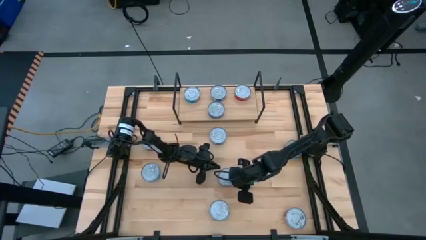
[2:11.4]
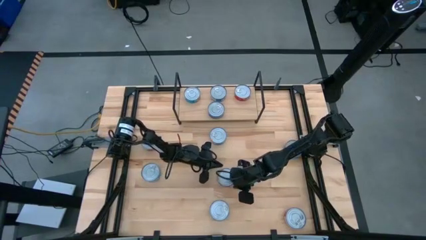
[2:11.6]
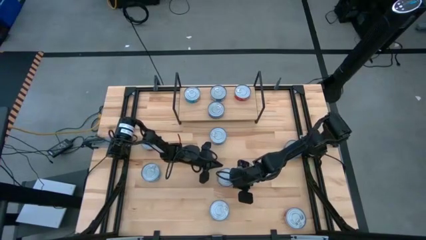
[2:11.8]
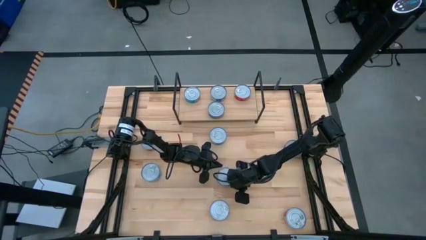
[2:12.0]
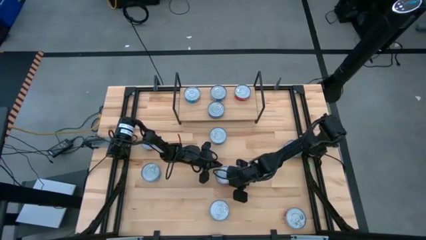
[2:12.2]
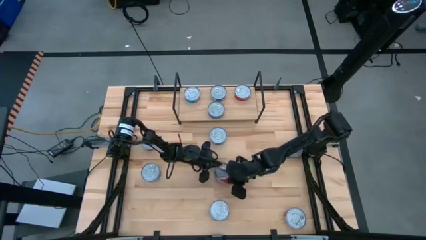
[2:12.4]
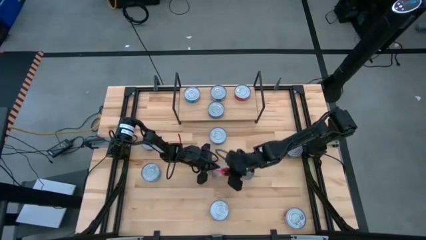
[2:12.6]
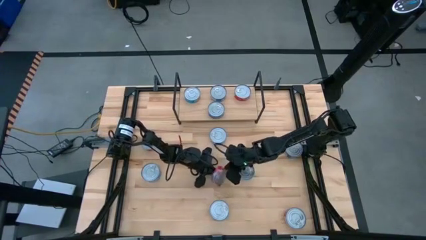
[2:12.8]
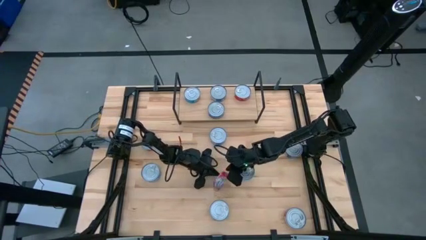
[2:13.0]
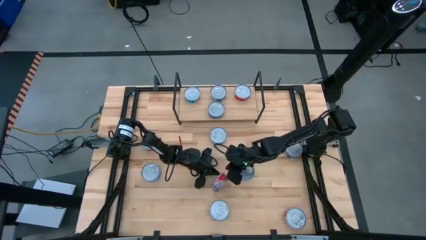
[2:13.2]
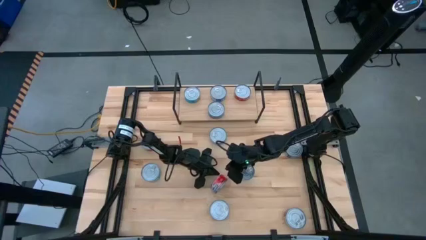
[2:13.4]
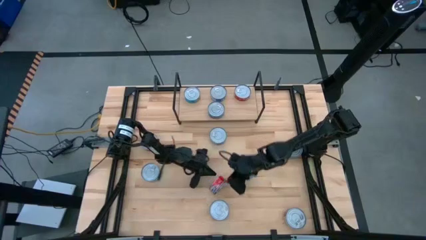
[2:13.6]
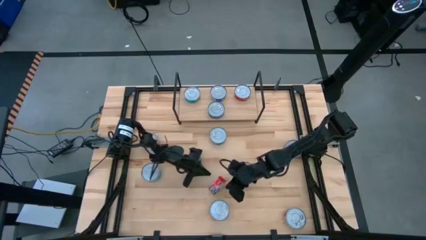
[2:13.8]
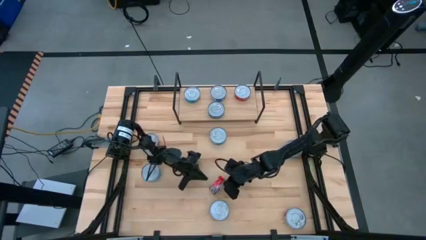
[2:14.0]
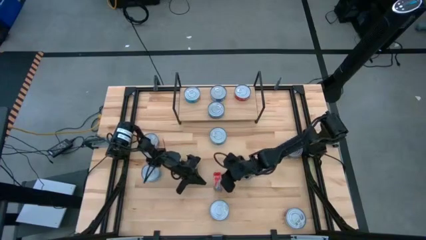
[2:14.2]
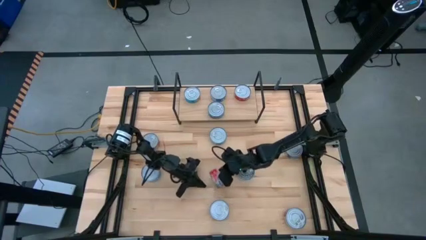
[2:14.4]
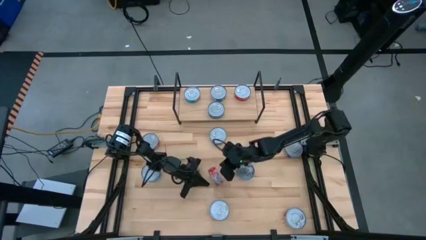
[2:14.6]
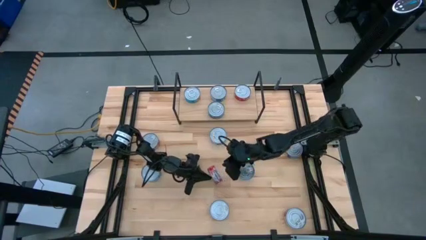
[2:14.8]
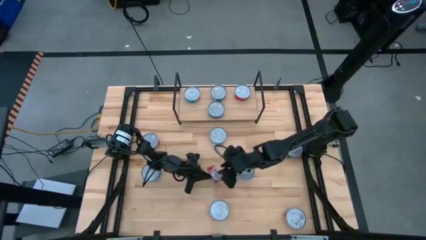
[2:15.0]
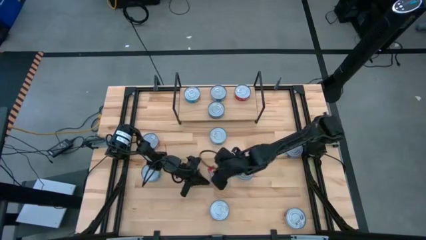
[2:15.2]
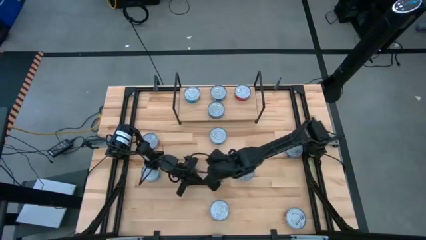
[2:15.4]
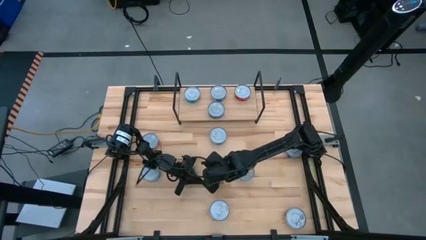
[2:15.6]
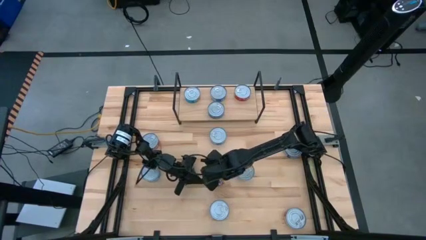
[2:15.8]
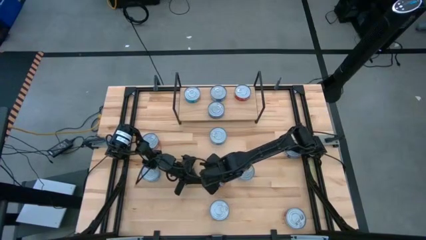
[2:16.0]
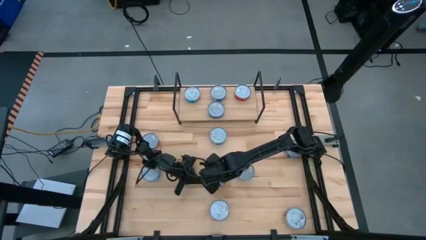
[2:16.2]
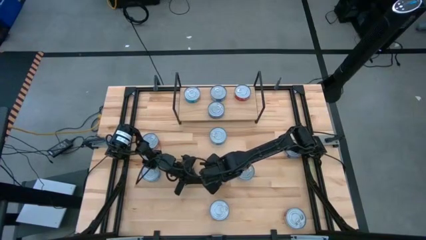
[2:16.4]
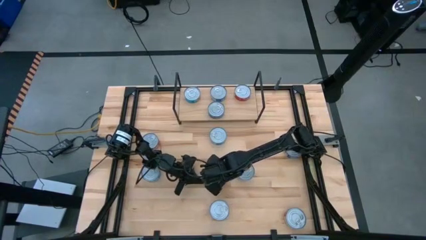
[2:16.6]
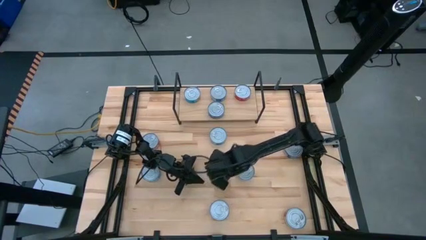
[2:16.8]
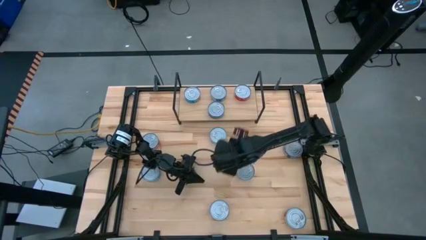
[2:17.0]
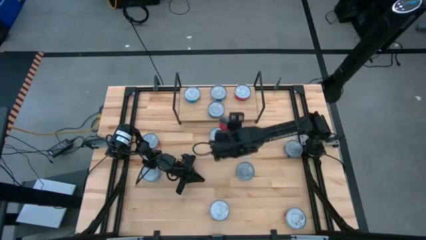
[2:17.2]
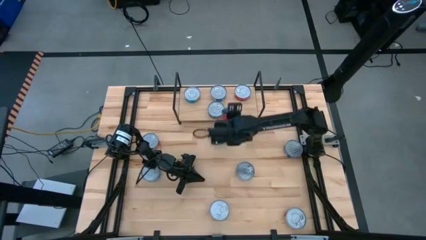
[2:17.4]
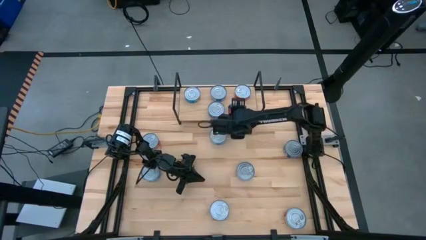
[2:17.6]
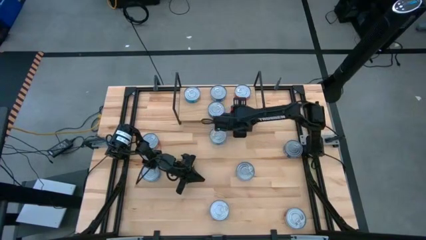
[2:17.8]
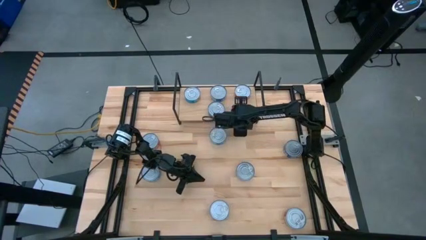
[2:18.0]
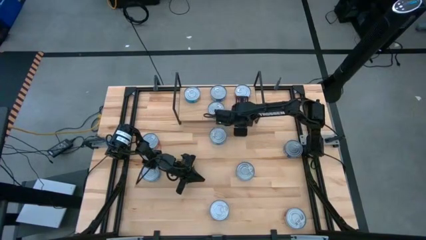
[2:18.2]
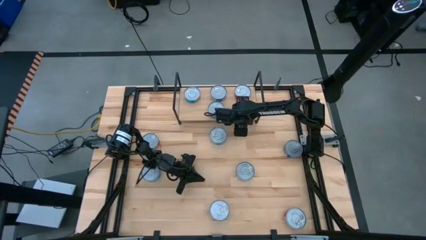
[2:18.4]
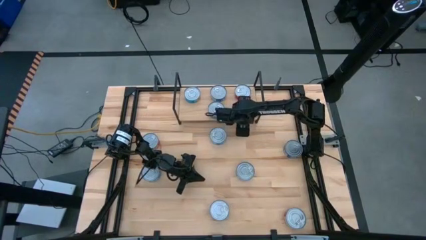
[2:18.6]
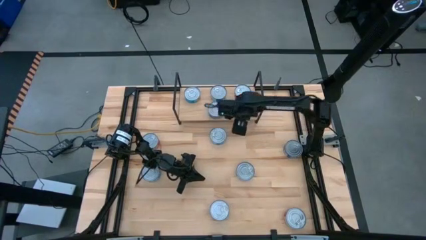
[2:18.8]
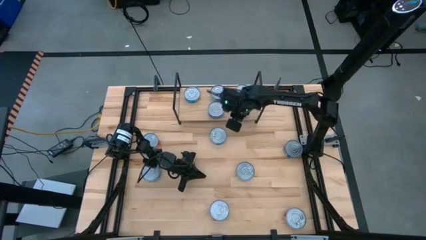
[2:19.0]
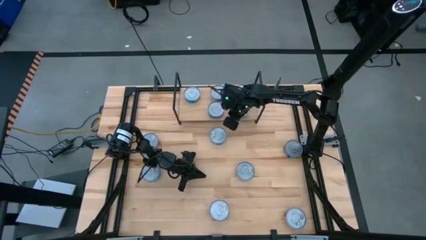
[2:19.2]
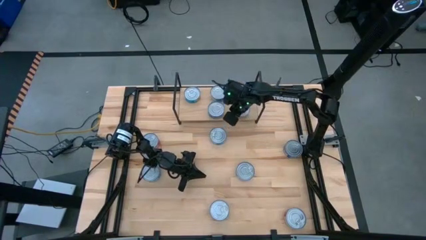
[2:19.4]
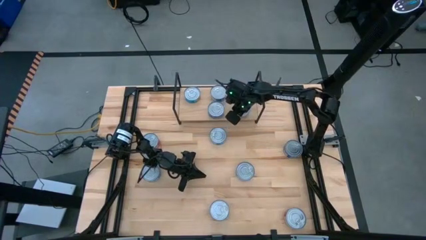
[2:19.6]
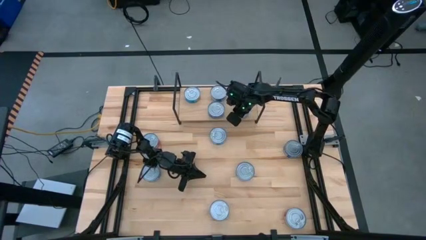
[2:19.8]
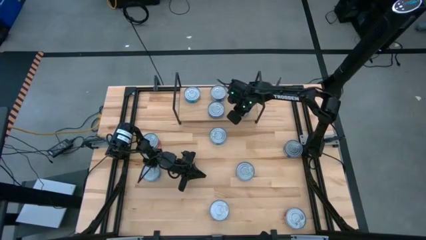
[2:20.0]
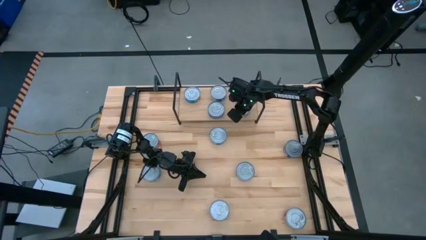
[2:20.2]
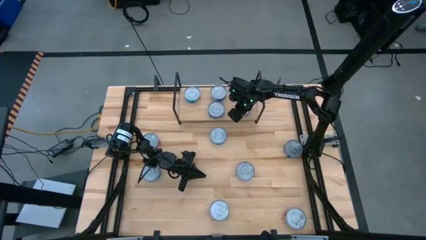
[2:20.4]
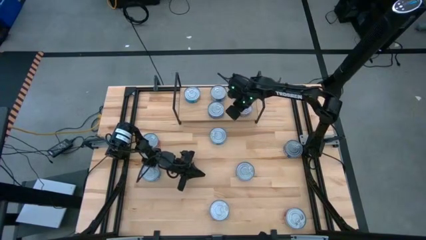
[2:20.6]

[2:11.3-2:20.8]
Task: Stack canned seafood by type on shelf
Put the center red tuna can on the shelf aligned with the red tuna can

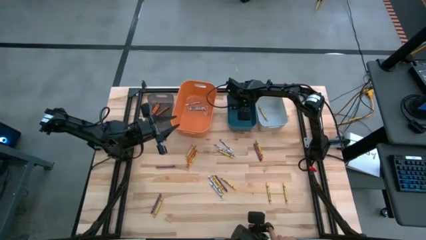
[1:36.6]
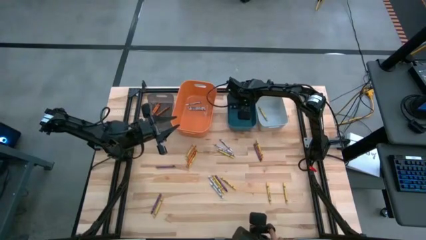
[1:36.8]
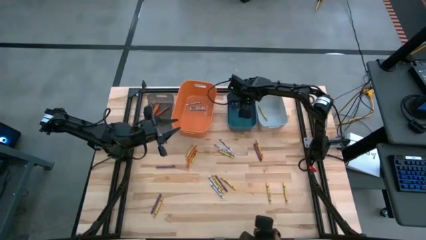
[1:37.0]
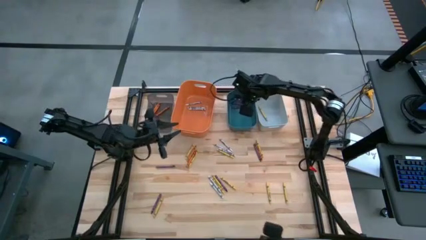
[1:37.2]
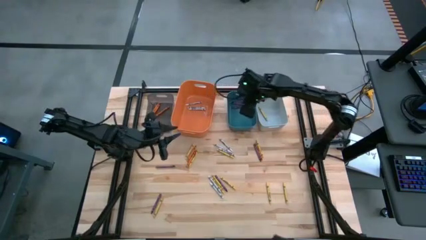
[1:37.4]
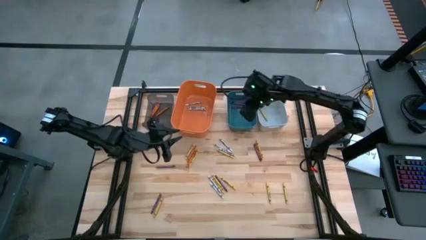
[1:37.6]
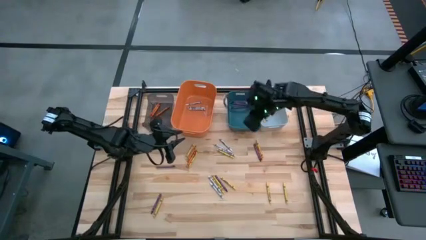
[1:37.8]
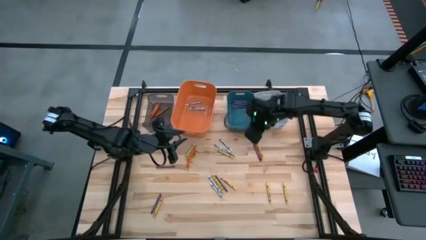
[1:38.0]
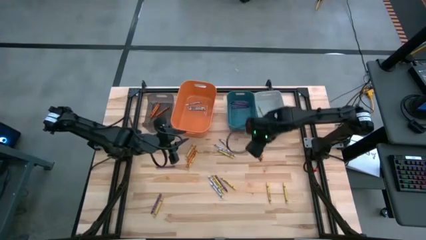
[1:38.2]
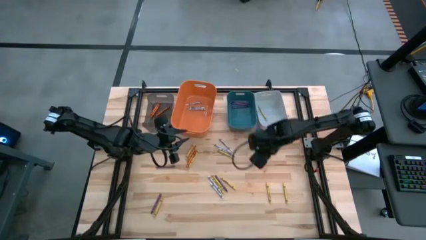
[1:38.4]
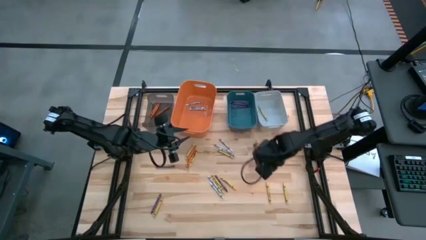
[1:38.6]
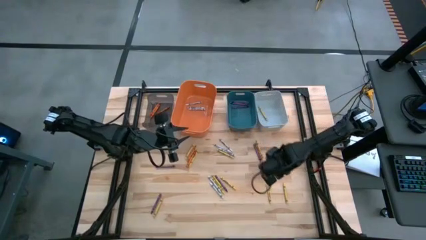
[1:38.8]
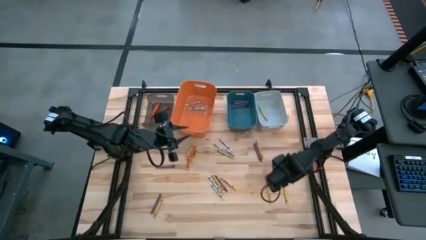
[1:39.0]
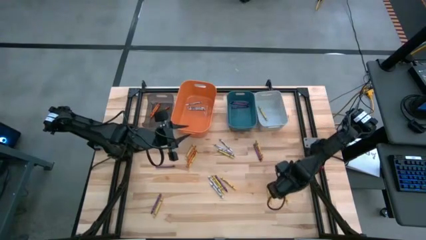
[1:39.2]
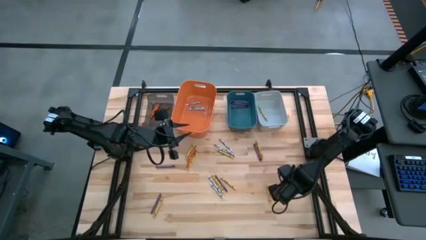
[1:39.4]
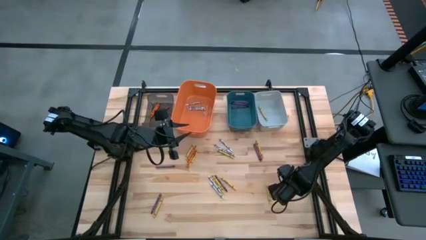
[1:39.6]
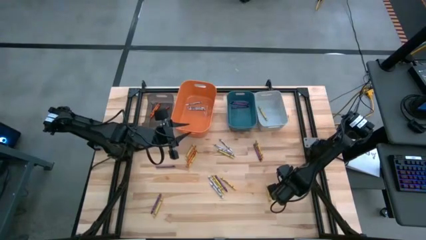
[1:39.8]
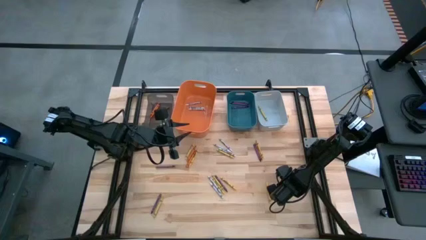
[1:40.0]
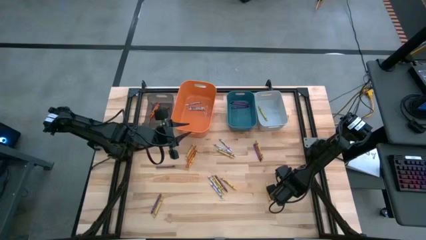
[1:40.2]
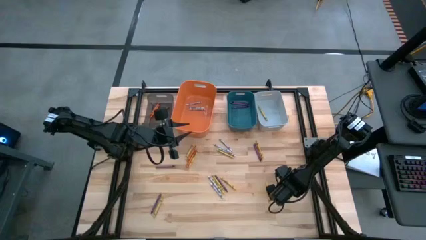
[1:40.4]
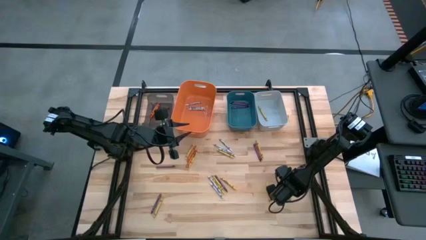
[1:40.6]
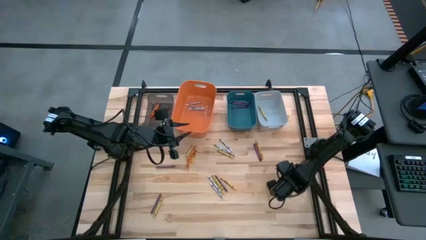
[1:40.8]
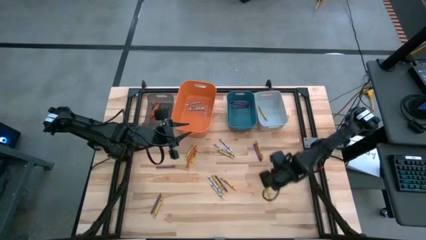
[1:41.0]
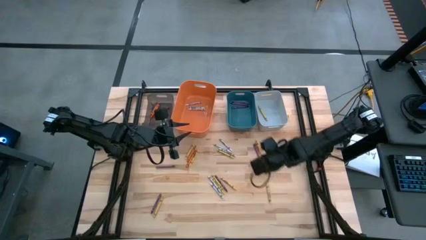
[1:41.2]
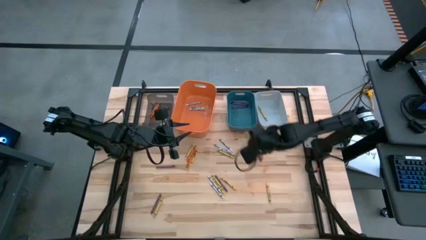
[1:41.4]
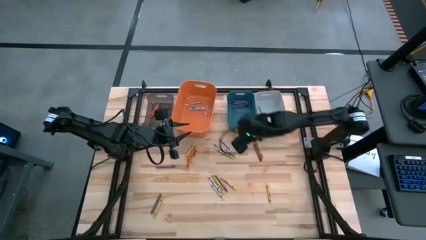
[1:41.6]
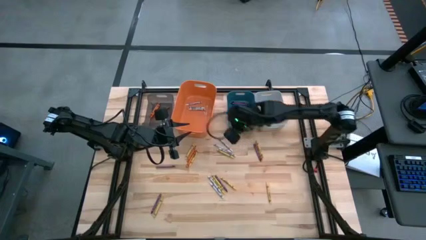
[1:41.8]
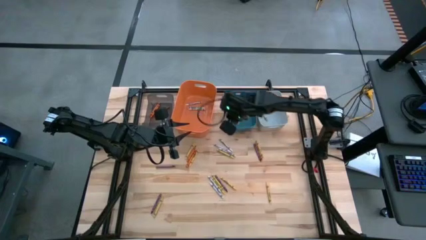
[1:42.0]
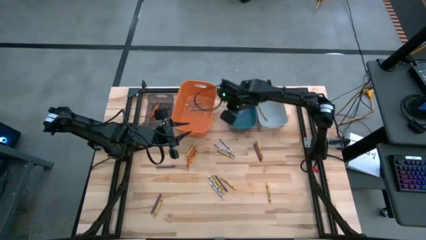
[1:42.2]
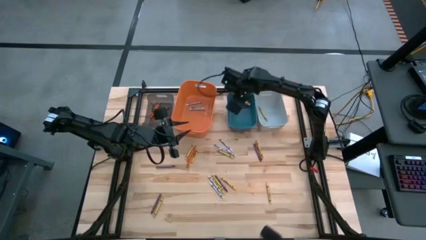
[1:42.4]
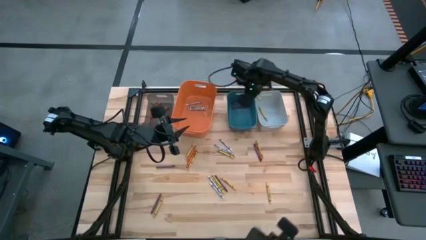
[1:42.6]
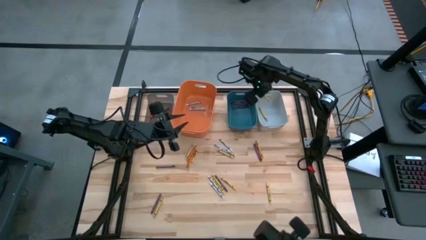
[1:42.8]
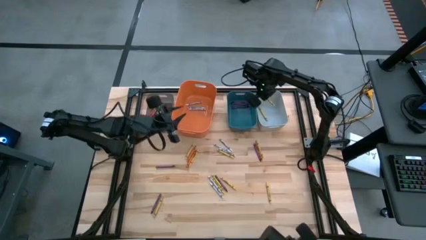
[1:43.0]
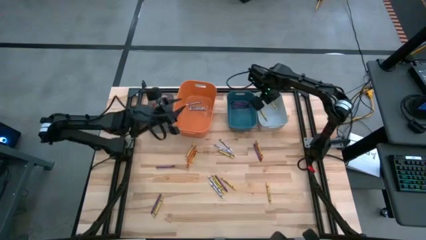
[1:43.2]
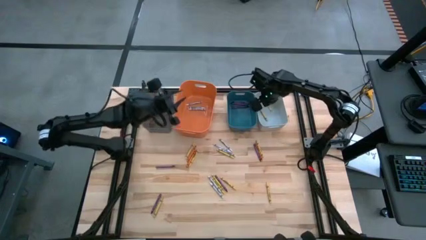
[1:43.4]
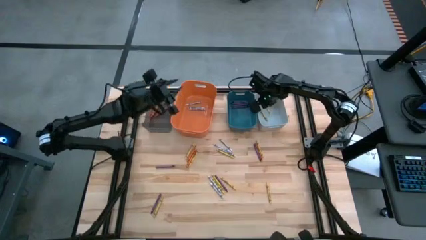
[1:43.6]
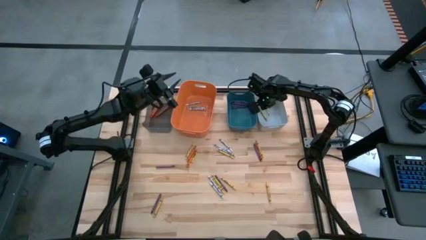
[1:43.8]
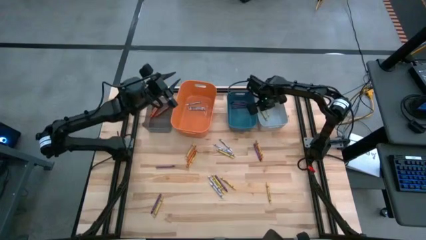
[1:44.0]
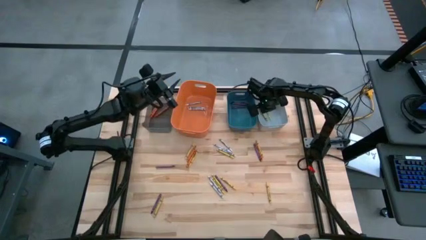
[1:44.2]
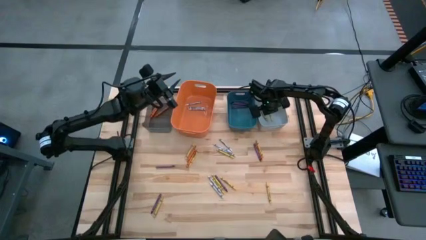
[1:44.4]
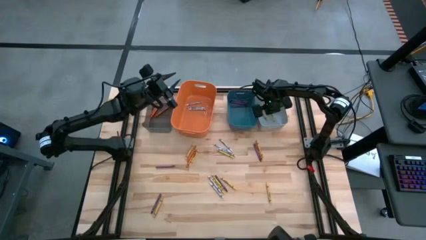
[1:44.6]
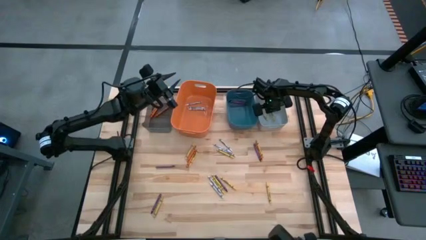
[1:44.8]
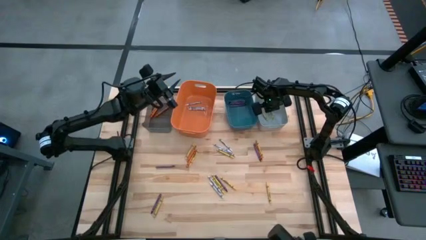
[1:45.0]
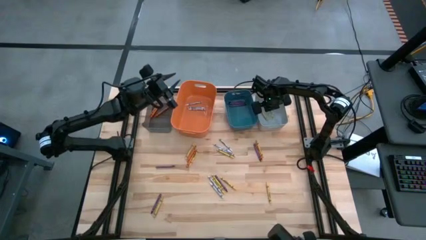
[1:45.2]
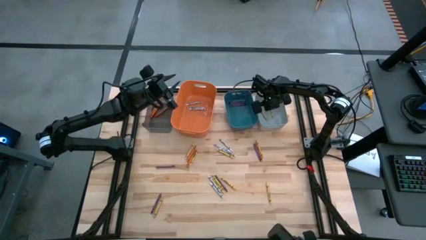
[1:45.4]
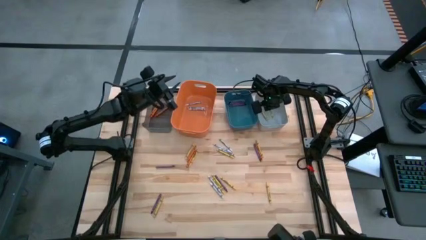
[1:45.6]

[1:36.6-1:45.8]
Task: Sort crayons
Put the yellow crayon into the white bin
